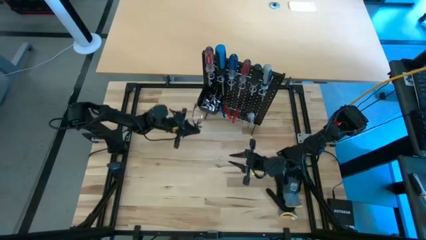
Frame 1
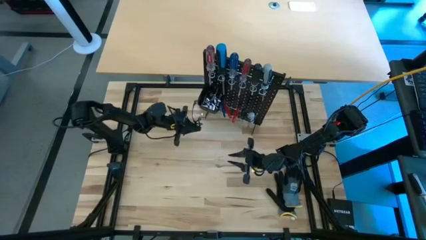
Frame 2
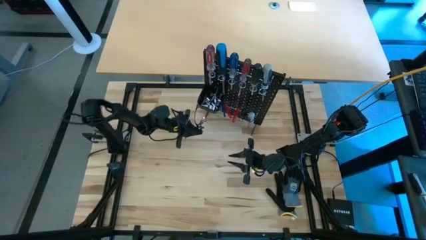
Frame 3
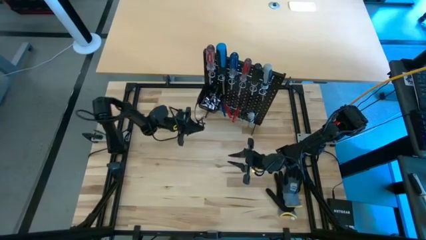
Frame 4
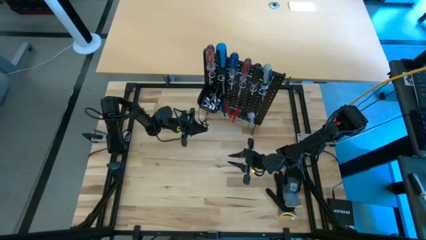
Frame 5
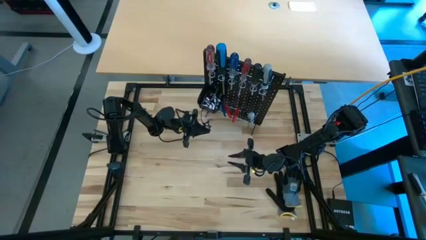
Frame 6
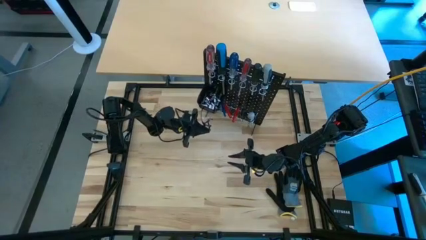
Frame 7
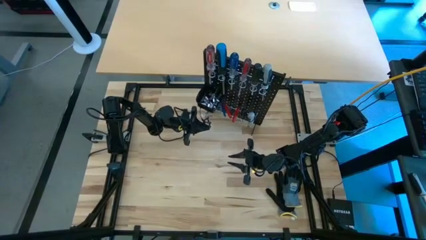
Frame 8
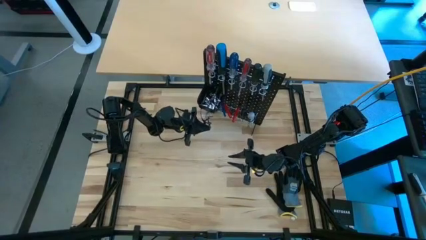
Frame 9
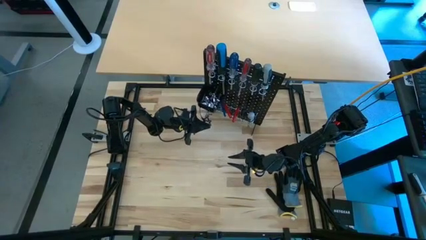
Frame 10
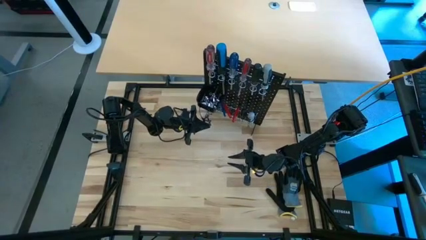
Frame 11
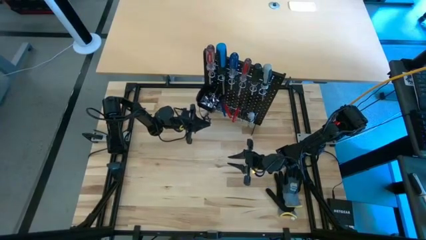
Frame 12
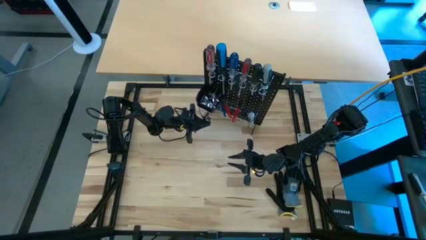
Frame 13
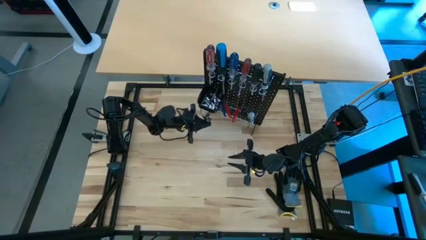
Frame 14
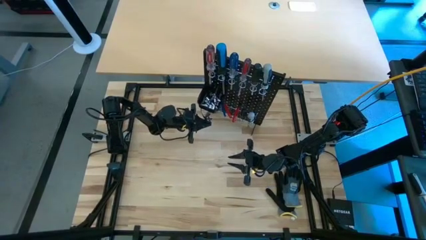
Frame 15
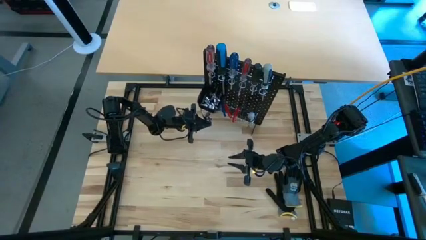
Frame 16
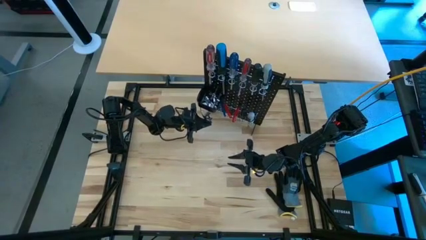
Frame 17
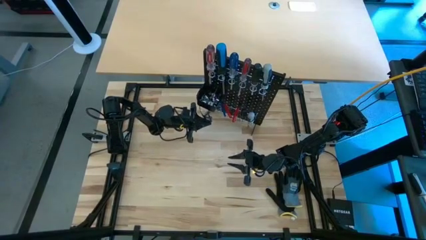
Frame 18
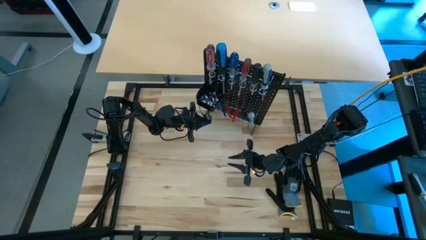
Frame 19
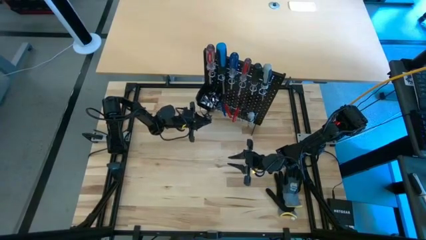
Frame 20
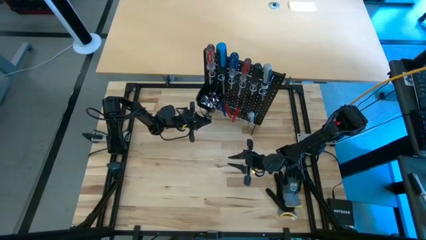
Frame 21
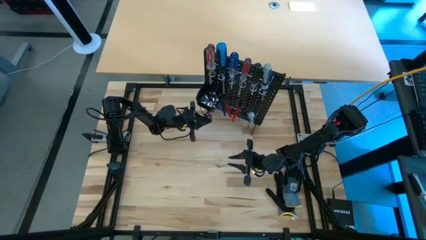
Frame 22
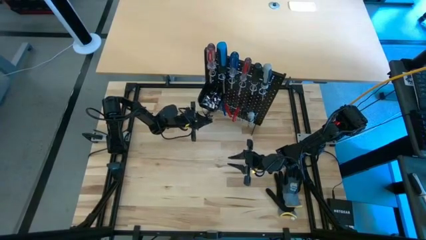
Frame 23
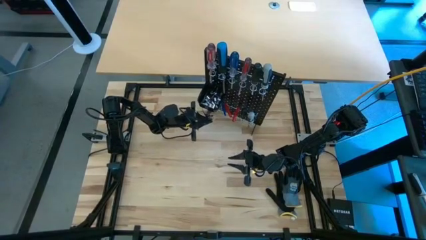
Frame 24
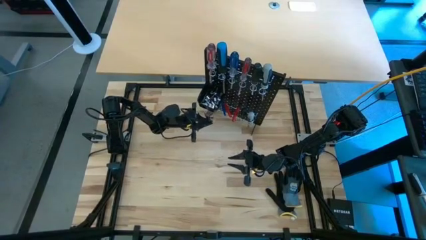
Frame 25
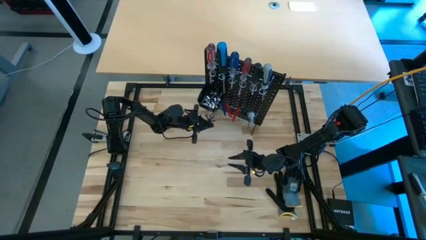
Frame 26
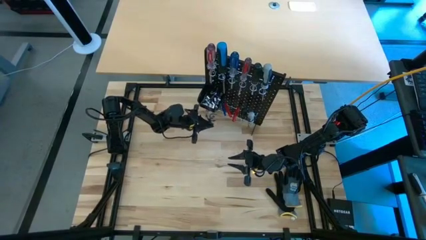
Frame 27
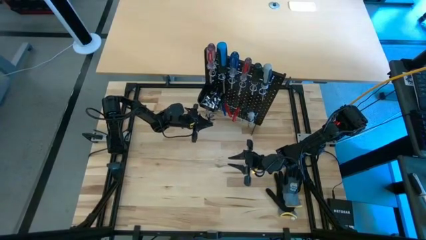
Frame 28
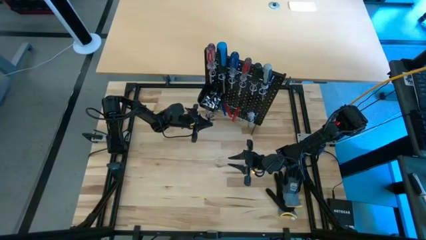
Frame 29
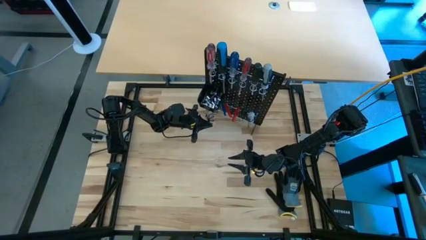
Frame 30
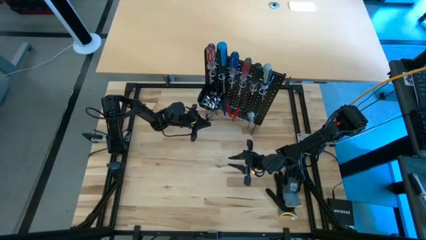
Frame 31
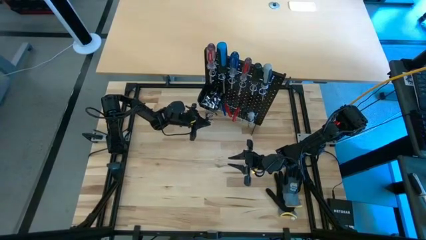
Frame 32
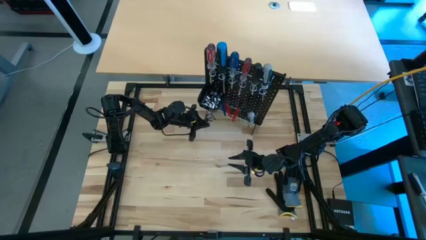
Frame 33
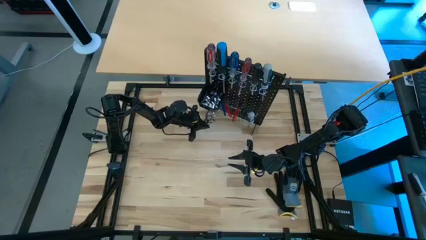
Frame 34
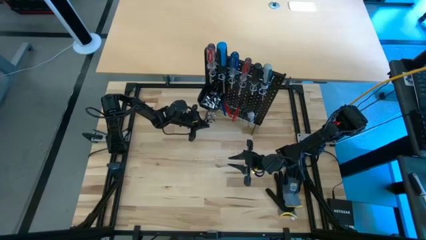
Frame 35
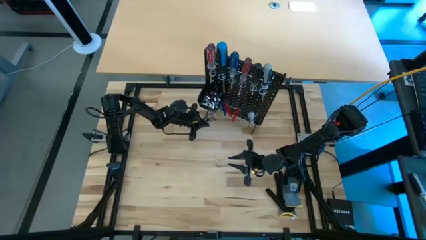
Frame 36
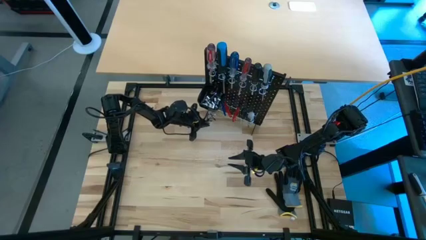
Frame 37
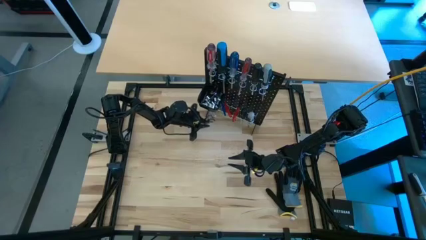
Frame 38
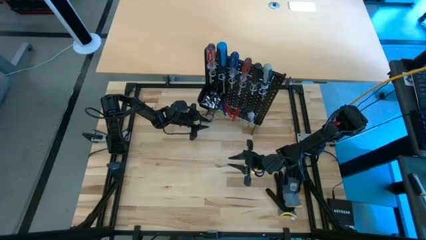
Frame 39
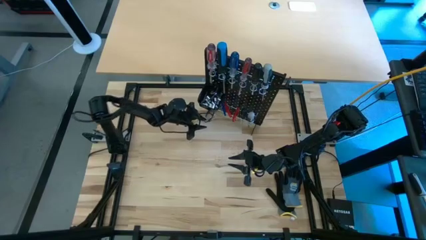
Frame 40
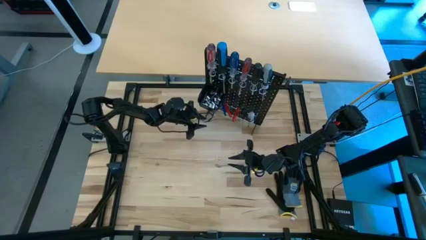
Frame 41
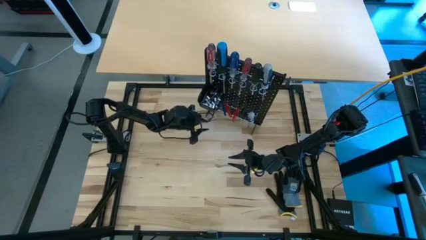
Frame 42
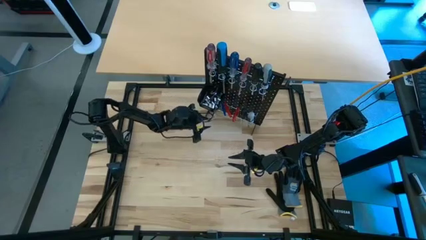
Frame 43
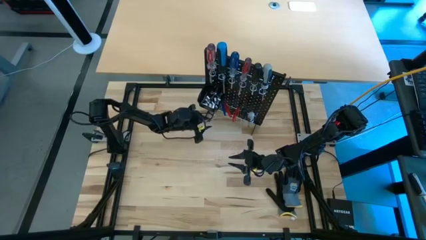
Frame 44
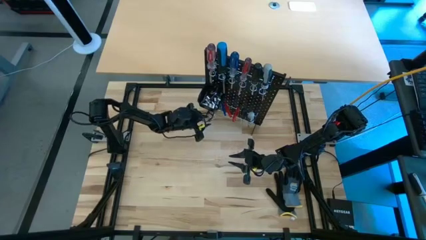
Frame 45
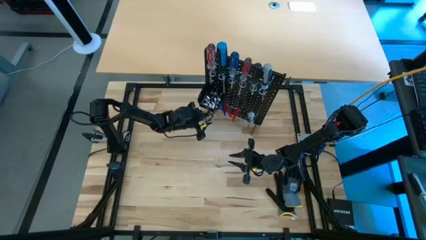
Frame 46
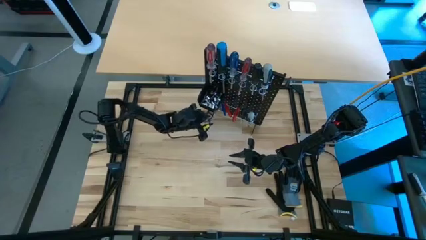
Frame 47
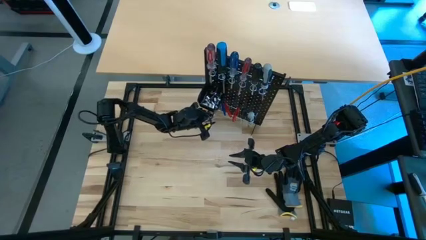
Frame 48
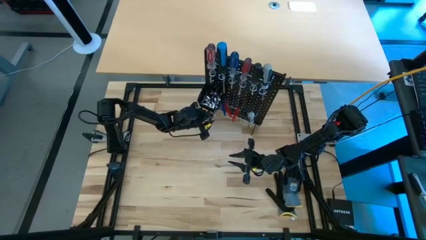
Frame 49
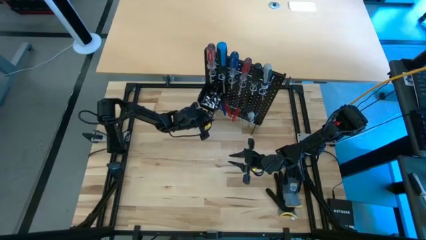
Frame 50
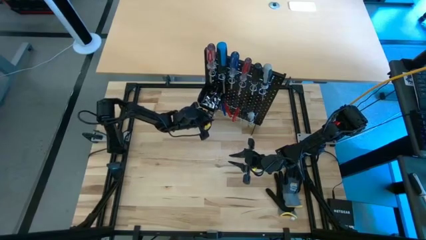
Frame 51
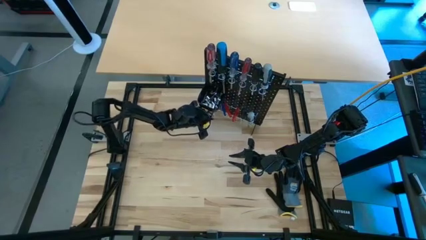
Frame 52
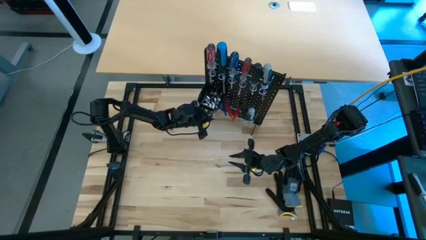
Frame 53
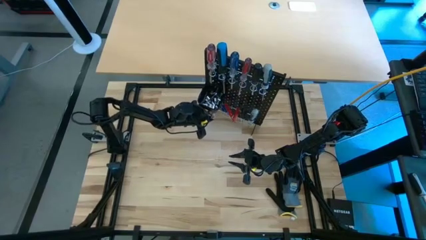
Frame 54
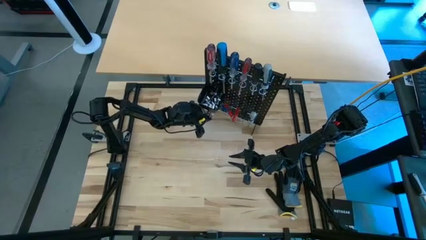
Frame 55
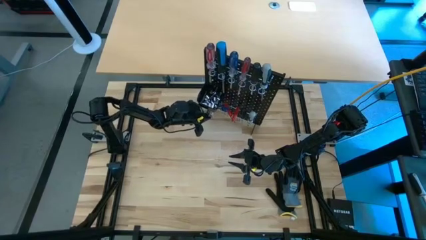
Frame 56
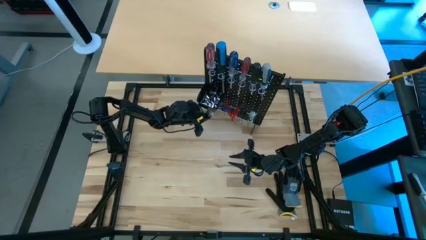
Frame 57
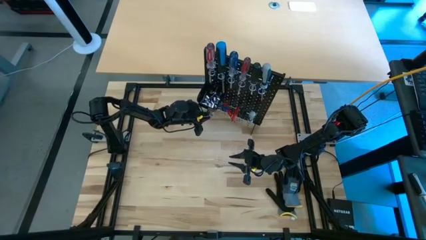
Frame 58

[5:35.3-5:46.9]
Task: Hang tools onto peg board
Hang the eye glasses on the black pegboard

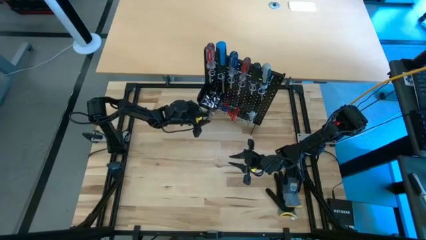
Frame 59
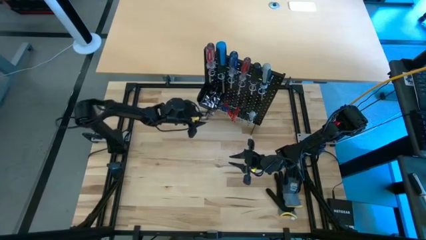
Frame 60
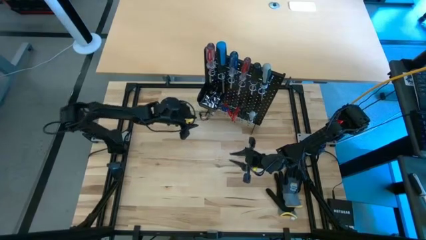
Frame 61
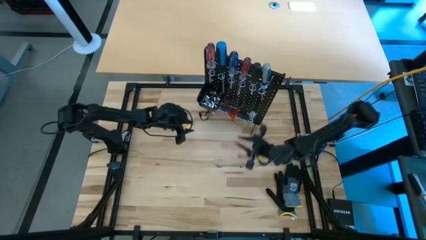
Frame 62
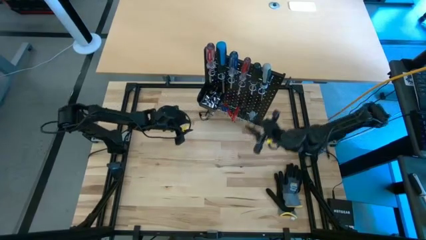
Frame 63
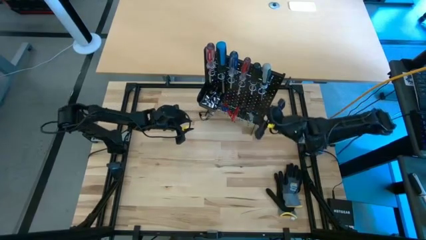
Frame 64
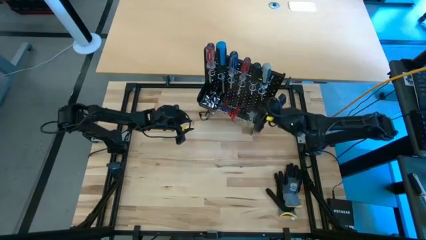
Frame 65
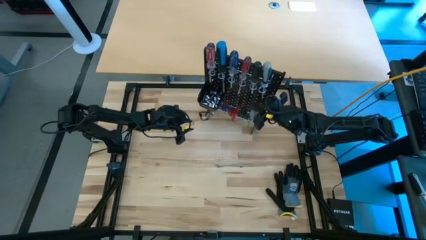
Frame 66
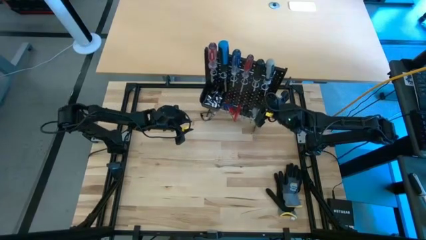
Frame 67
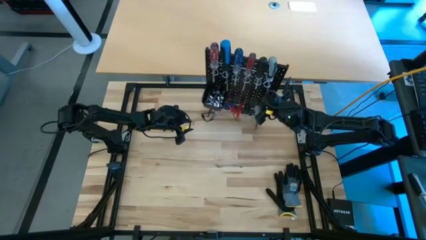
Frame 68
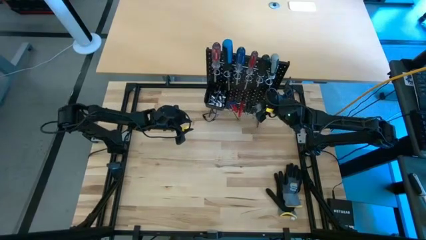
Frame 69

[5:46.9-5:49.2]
Adjust the black pegboard
